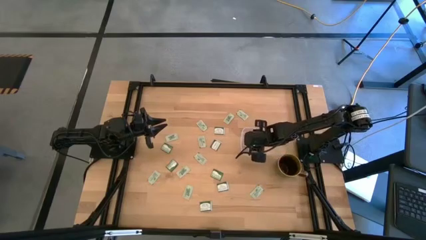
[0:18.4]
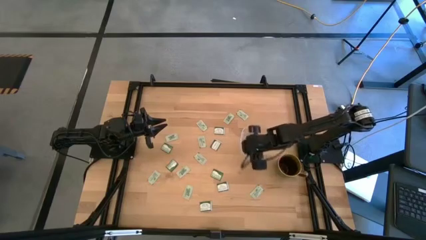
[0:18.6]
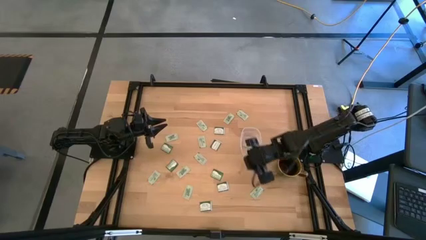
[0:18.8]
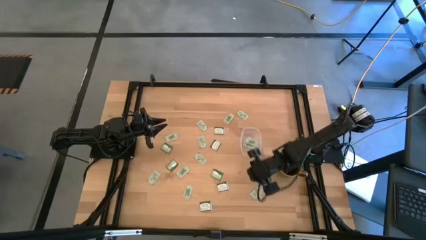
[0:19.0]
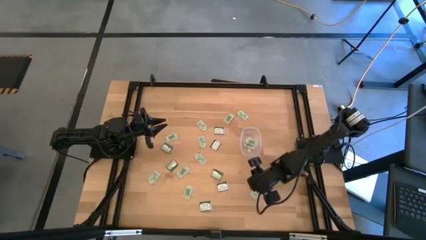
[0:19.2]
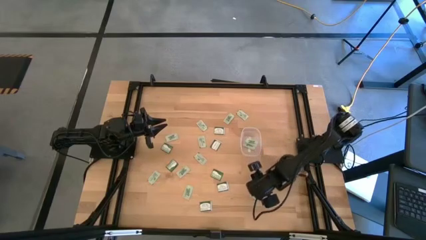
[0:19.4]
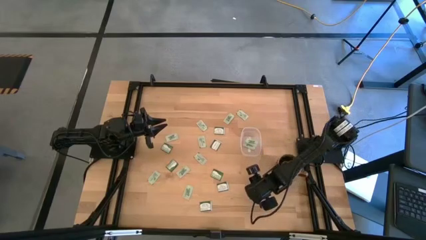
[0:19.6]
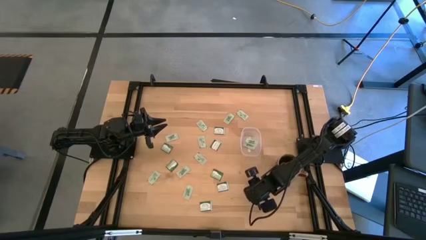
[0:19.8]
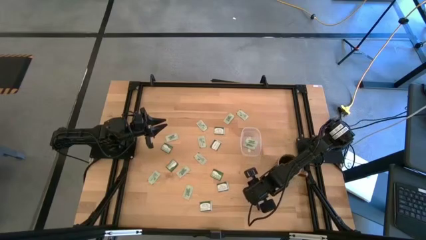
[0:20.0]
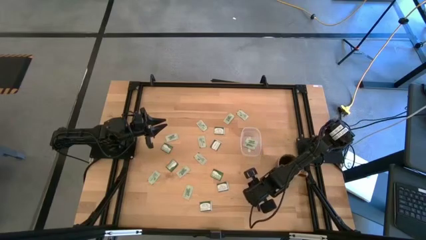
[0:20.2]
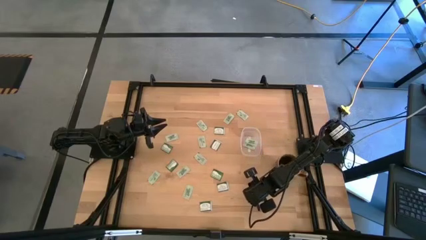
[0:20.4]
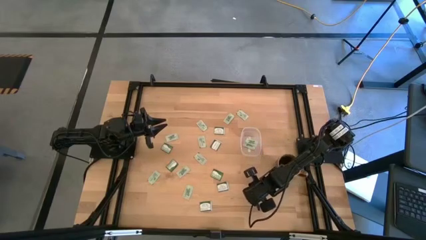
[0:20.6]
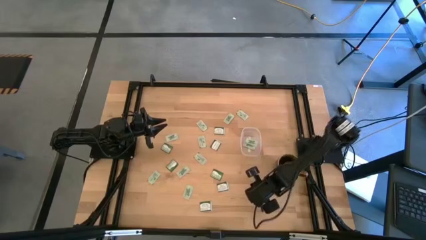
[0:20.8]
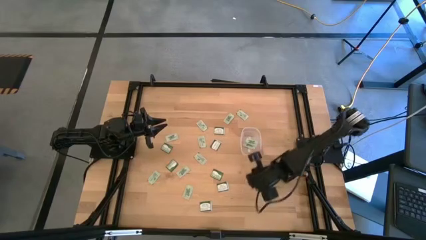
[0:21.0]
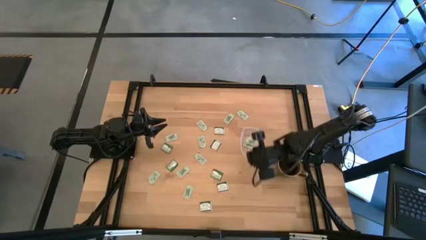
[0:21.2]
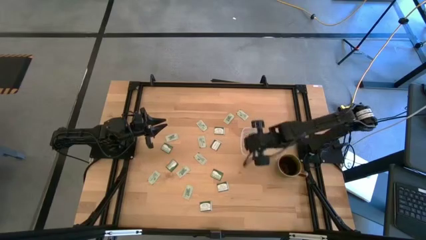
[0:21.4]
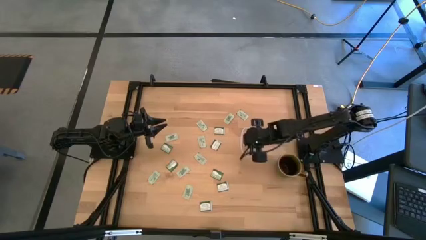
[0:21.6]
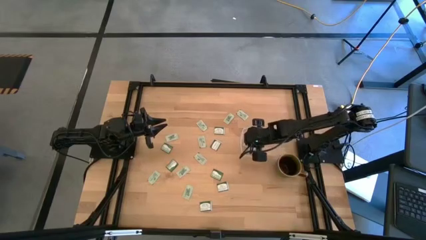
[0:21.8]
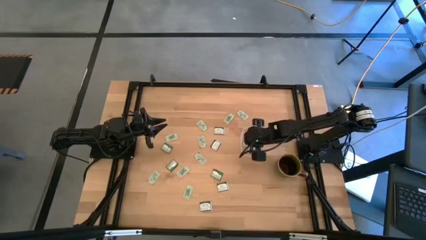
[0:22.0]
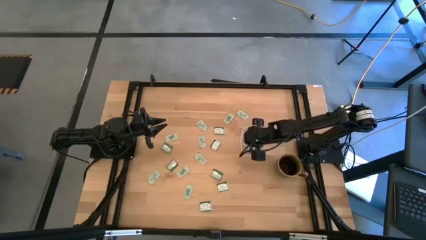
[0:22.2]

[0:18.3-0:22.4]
Task: Pick and place items into bin
Put the stevia packet into the transparent bin

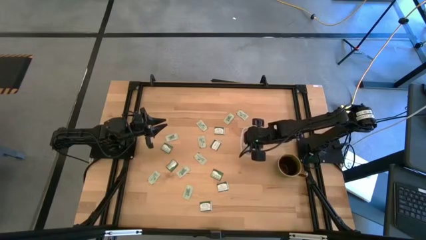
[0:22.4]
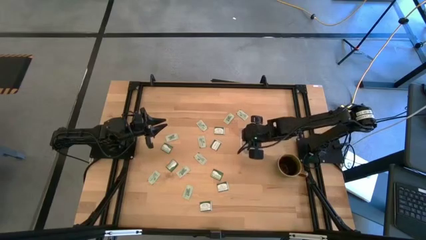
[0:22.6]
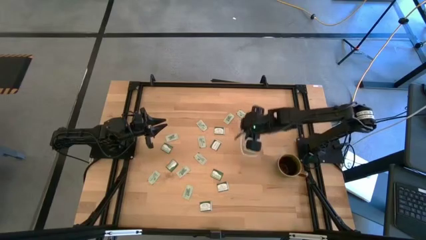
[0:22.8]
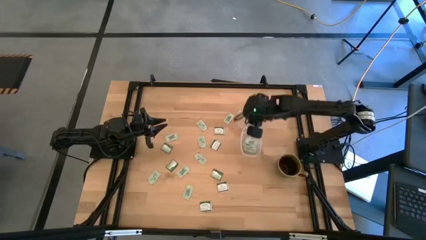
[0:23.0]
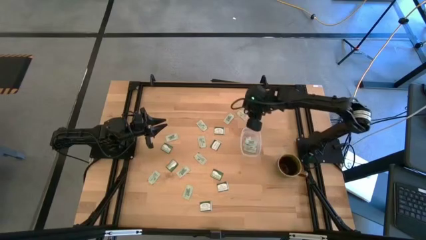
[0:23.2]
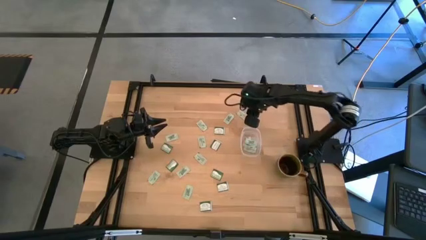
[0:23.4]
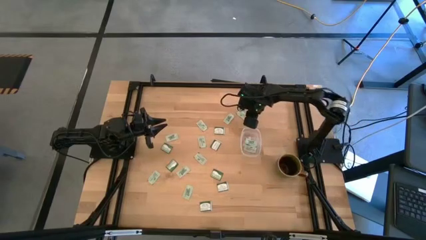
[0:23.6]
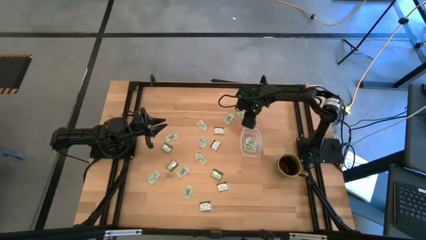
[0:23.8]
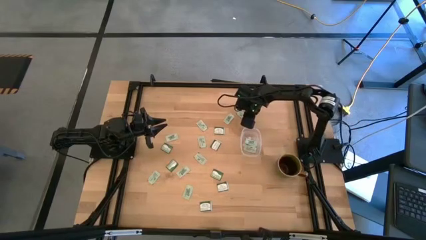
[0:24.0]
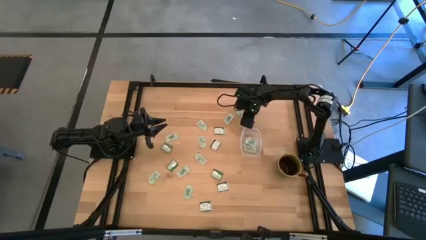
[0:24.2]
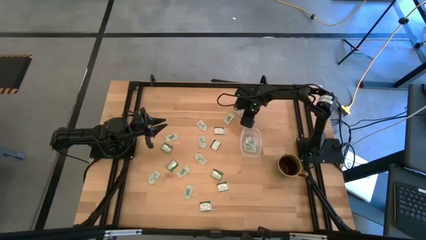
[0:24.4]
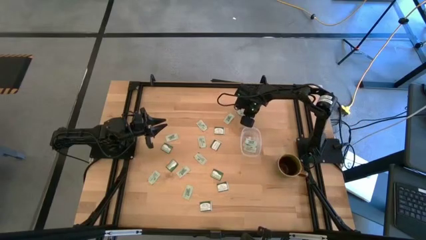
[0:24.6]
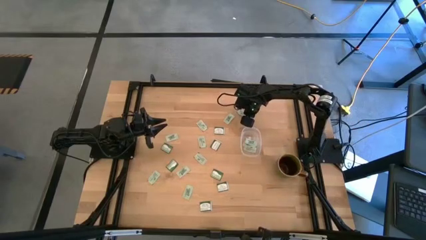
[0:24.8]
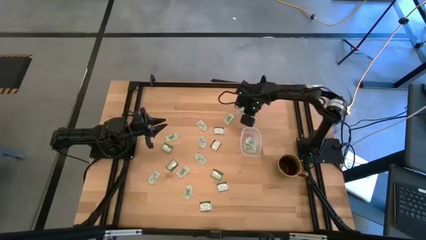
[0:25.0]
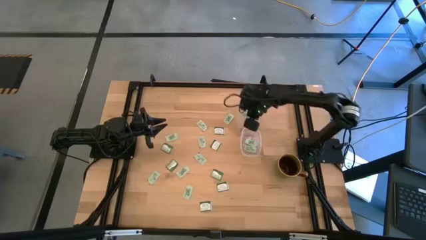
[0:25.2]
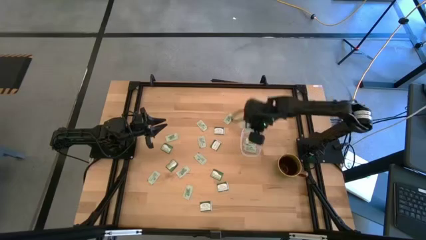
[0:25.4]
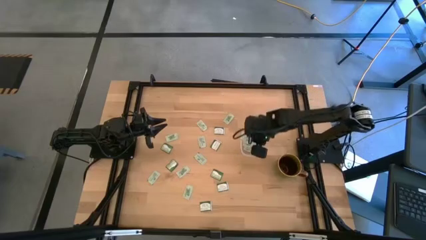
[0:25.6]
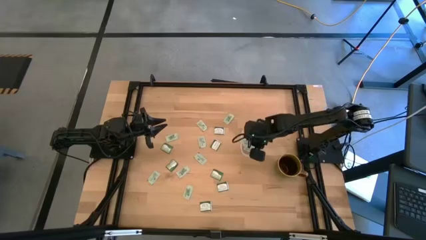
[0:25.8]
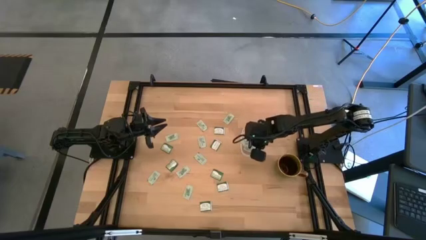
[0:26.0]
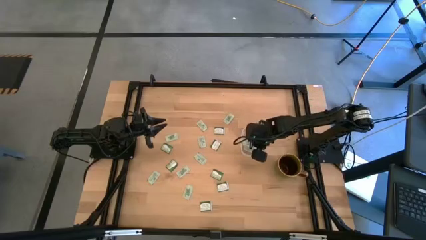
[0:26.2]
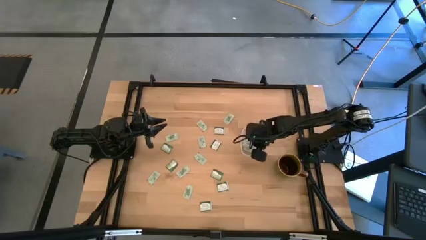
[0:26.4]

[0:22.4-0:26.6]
Put the stevia packet into the transparent bin

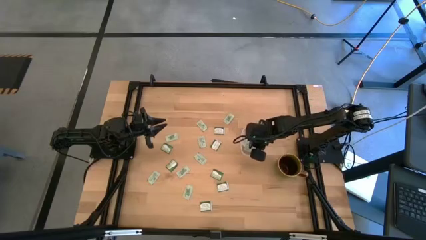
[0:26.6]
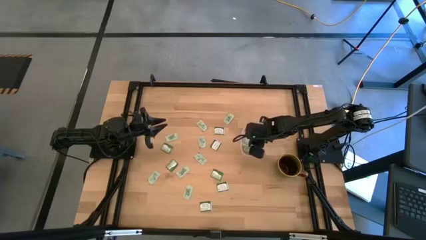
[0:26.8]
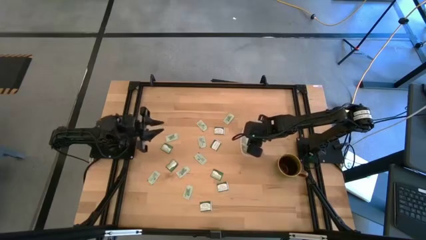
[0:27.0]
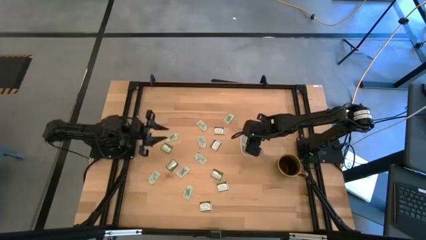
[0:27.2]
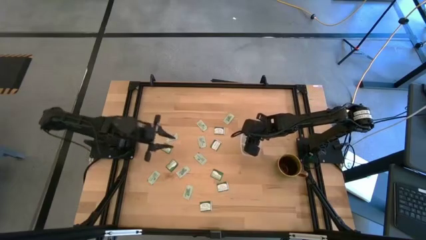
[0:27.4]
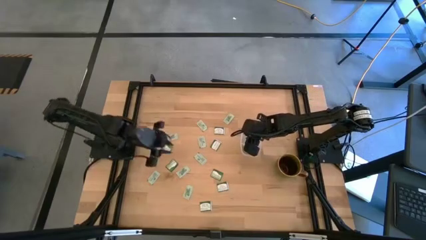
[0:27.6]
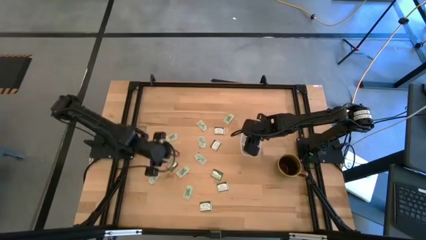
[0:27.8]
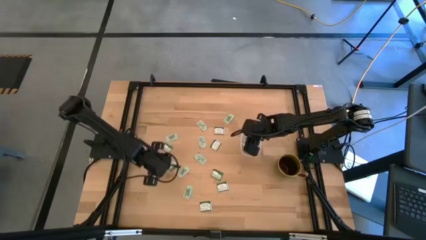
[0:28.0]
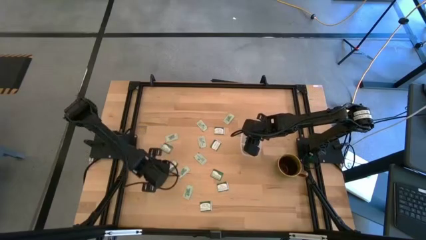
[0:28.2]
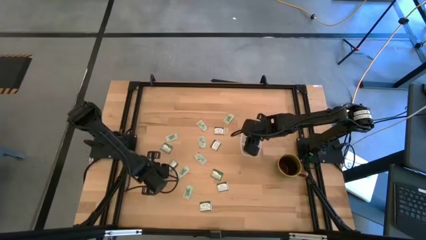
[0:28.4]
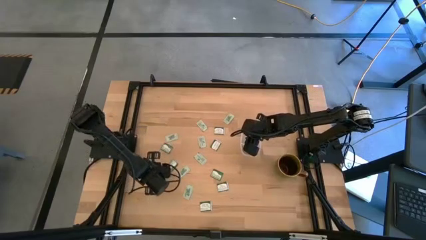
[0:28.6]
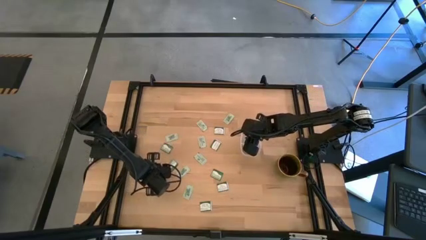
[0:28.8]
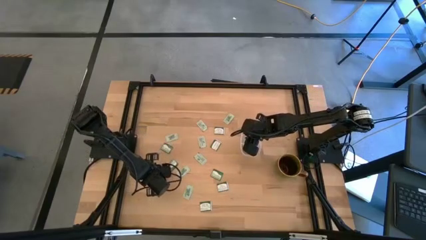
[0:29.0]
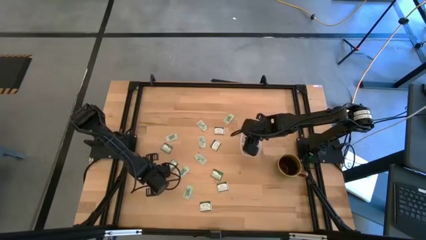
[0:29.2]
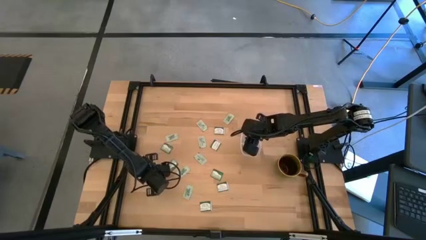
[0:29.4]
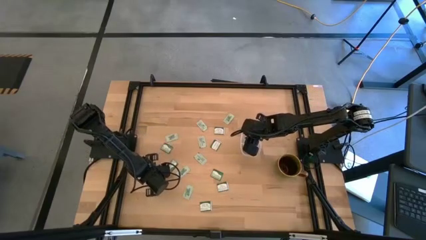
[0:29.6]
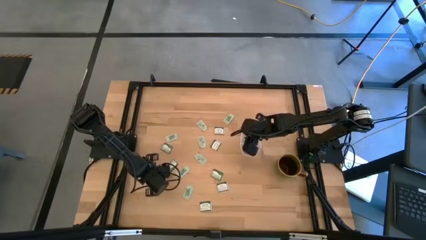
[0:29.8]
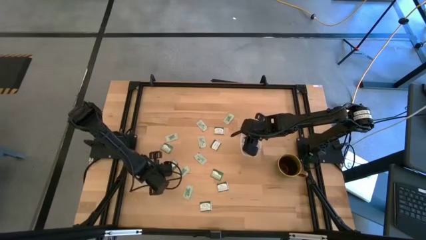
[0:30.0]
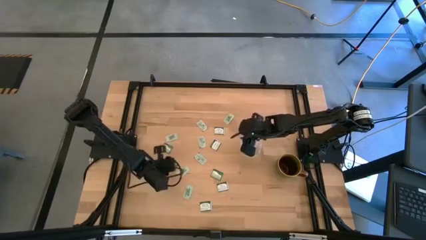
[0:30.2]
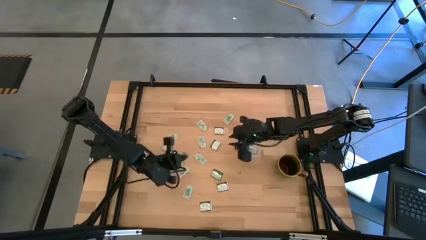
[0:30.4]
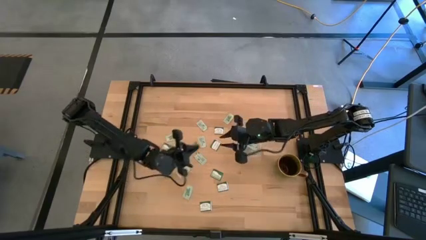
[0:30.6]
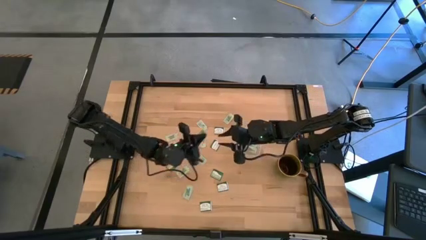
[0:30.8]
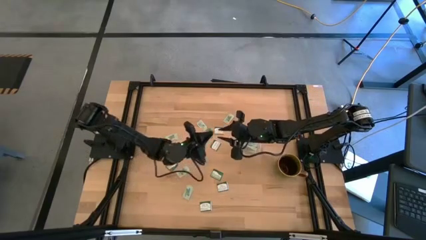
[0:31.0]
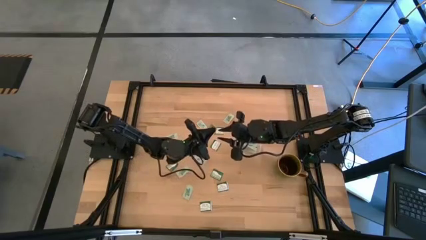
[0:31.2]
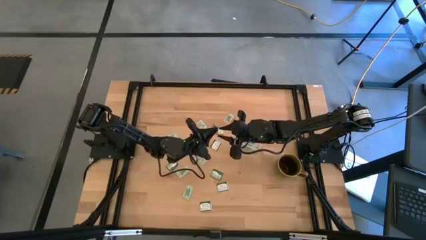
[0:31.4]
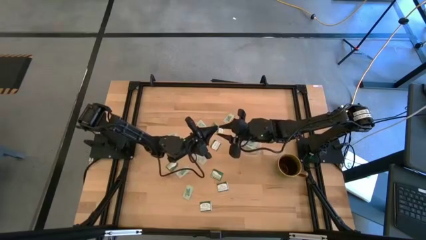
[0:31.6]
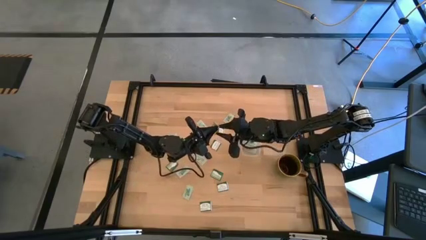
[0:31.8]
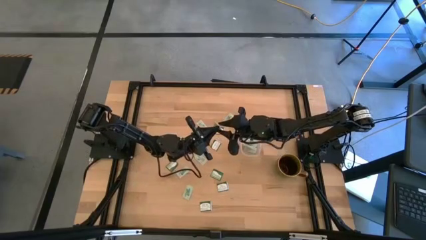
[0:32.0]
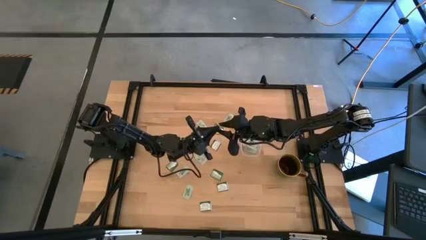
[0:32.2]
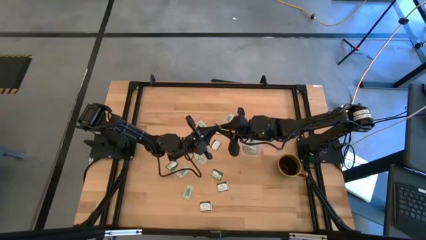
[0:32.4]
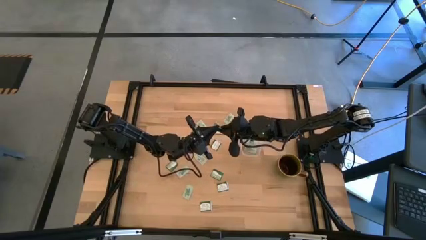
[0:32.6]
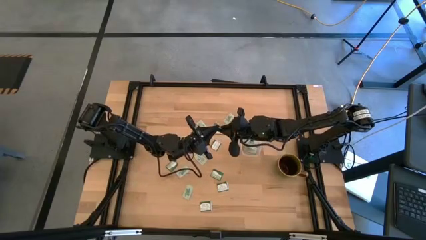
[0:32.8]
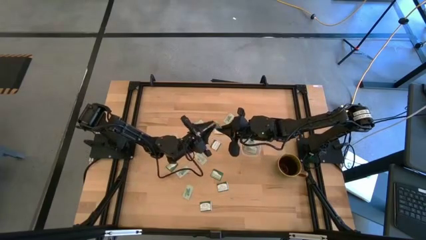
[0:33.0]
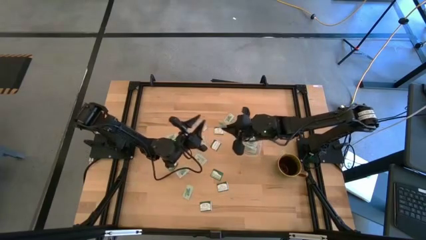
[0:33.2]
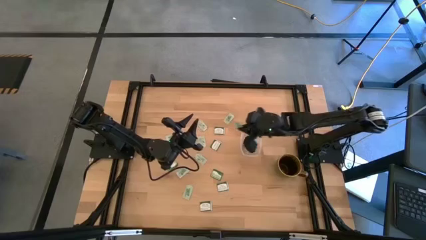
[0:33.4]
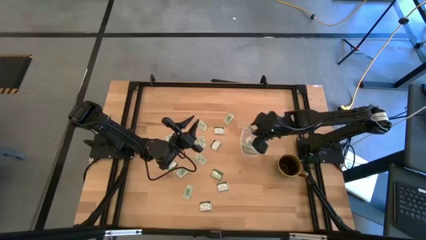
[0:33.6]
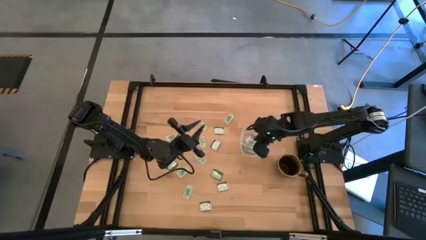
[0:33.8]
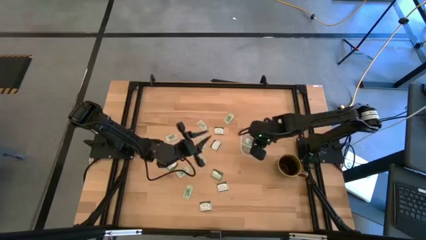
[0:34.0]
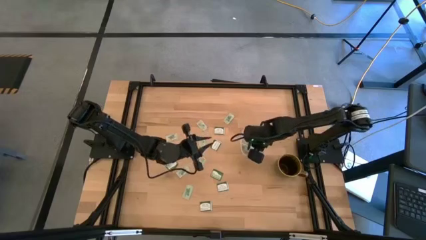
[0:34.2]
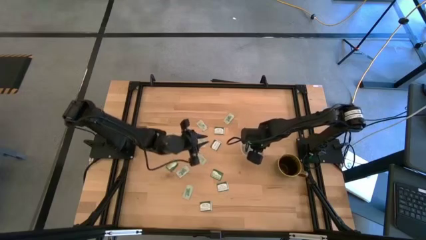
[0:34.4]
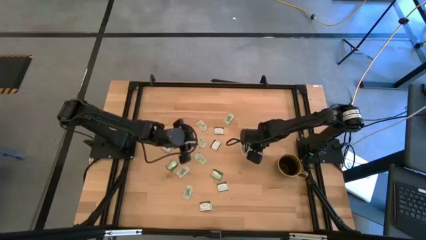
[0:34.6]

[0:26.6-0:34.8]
Put the stevia packet into the transparent bin
